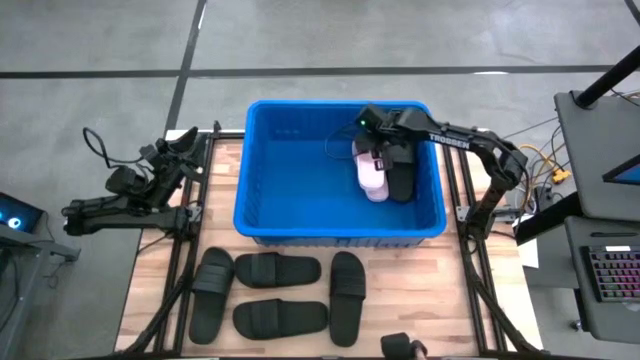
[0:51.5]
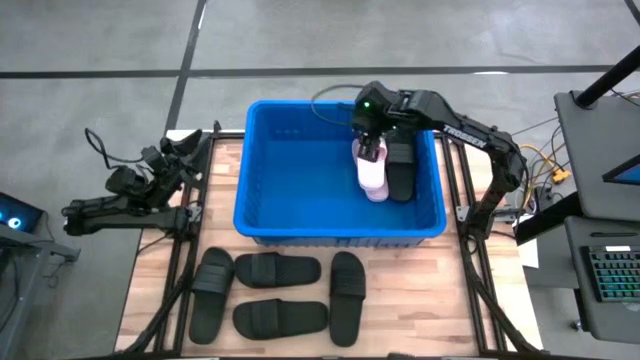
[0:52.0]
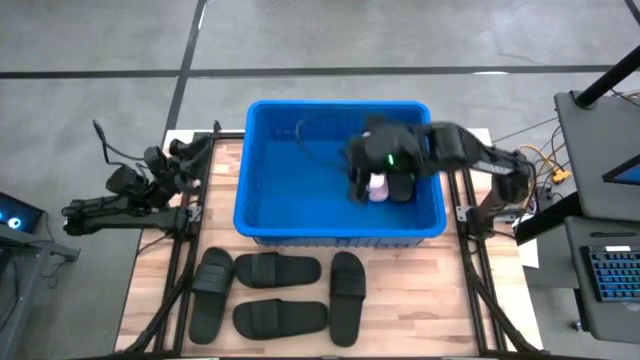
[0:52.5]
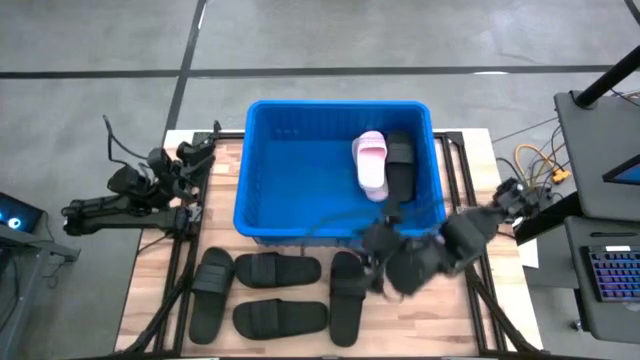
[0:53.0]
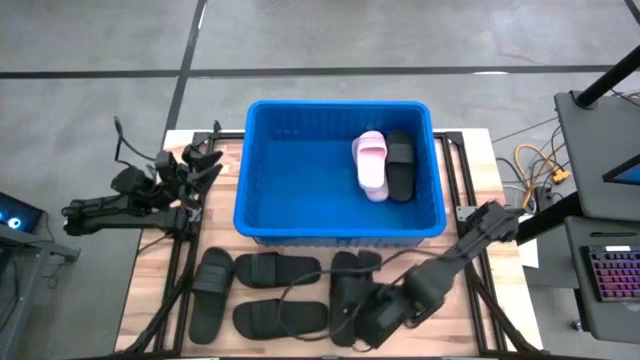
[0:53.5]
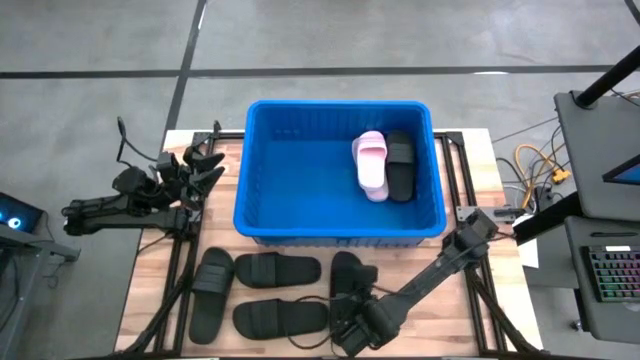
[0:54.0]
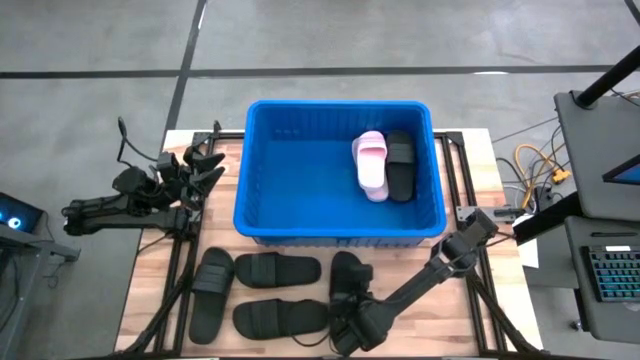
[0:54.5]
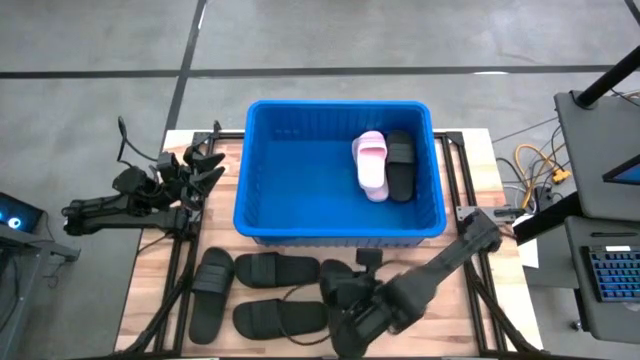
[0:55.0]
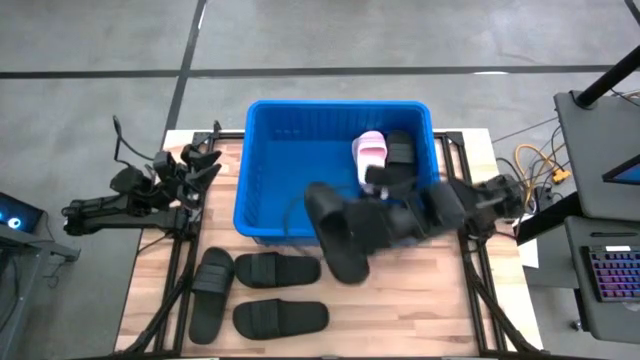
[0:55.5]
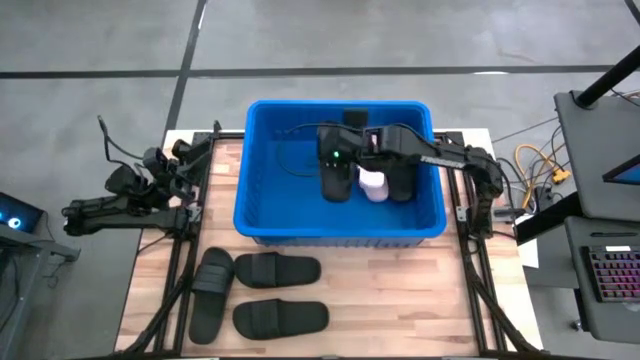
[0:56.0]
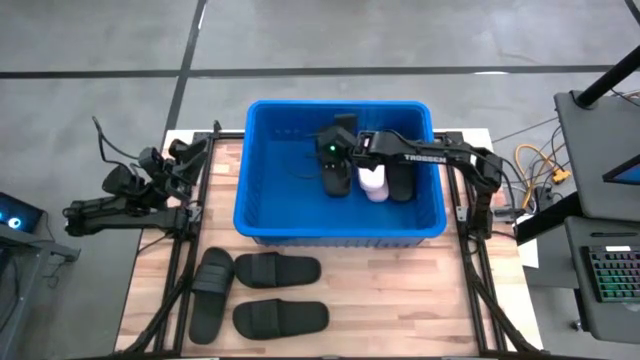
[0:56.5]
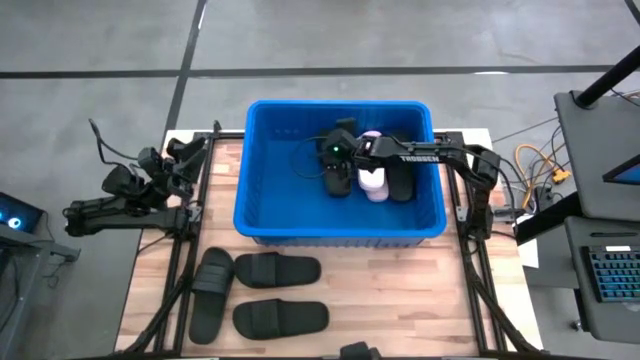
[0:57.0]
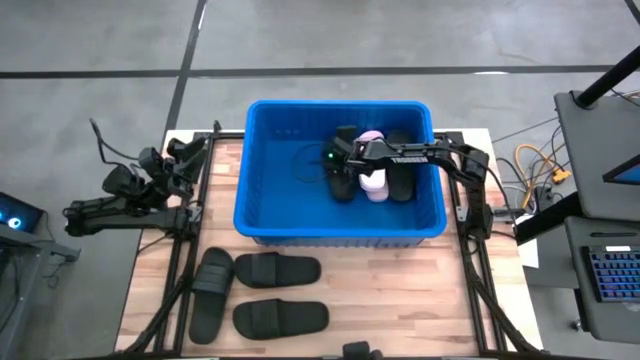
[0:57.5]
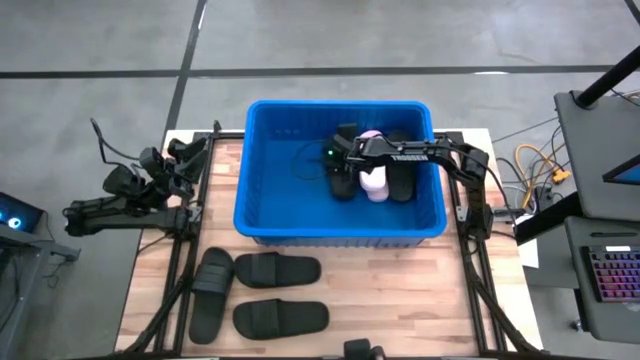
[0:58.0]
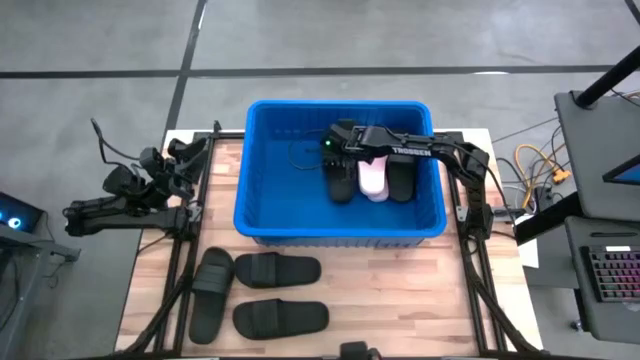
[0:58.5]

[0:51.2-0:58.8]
Task: Pick and place slides into bin
Put the black slide into the blue bin

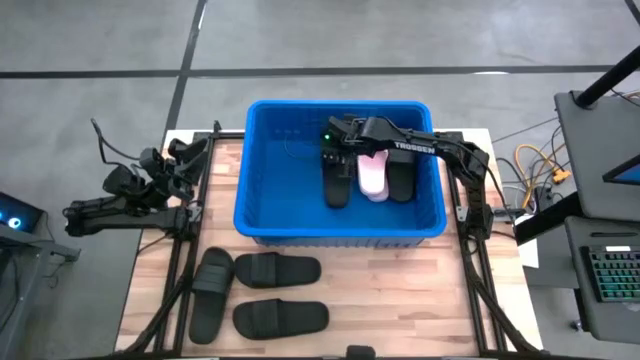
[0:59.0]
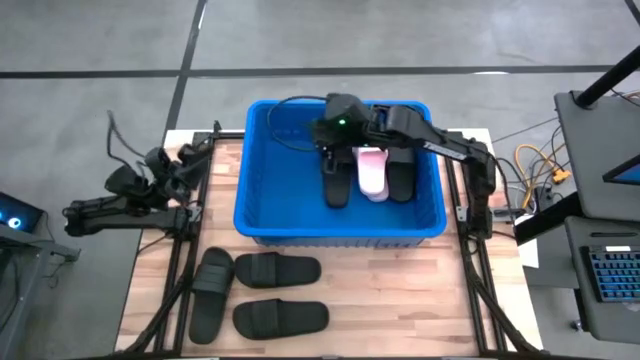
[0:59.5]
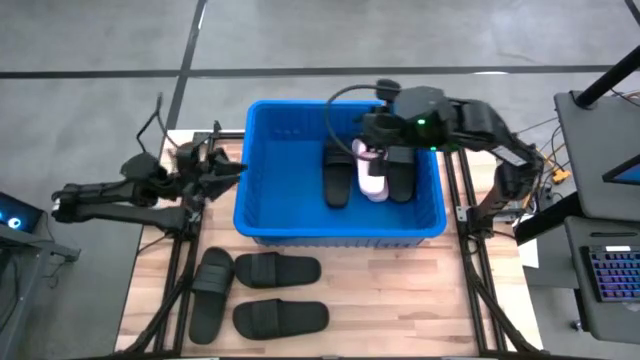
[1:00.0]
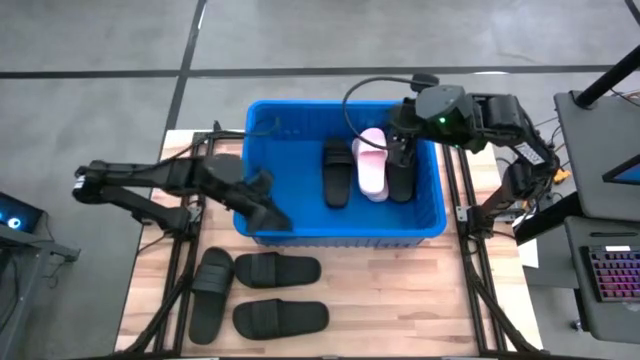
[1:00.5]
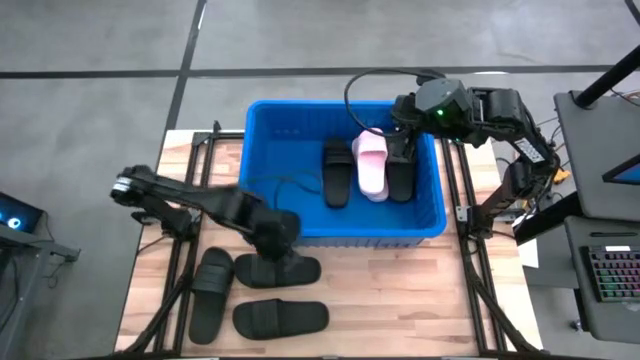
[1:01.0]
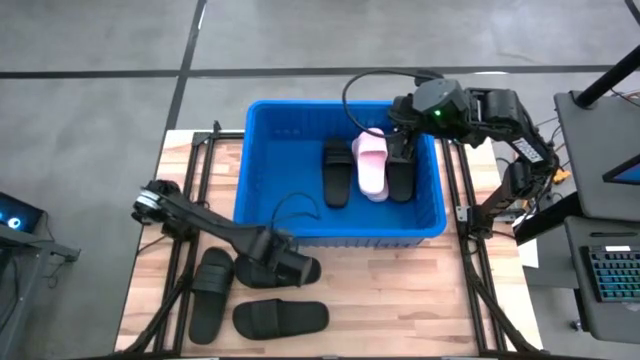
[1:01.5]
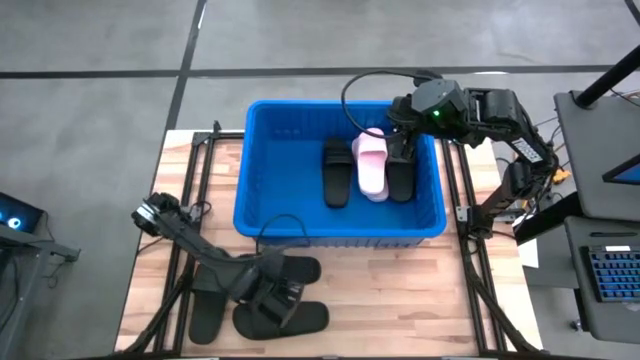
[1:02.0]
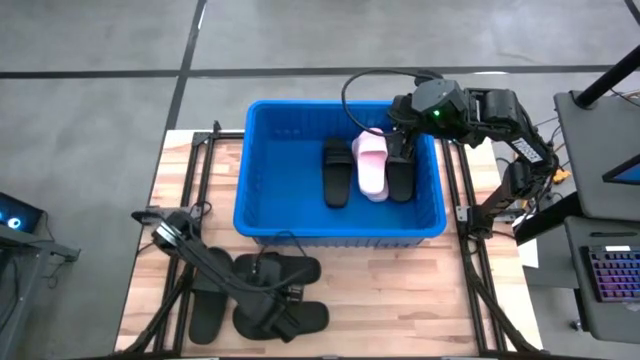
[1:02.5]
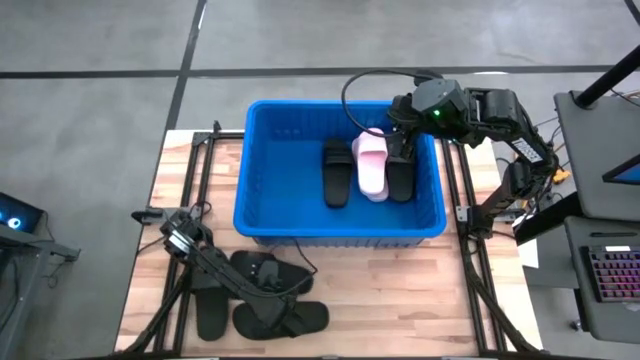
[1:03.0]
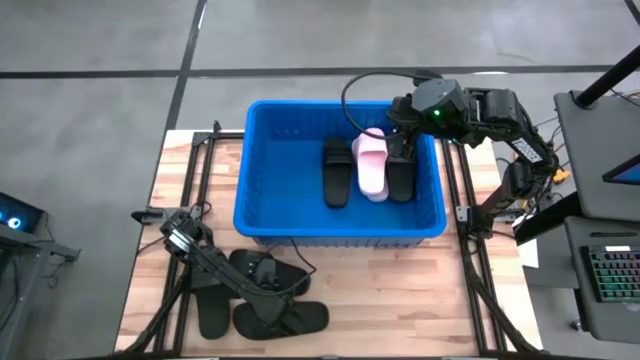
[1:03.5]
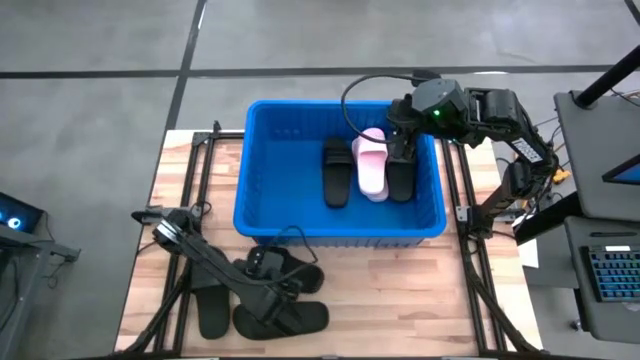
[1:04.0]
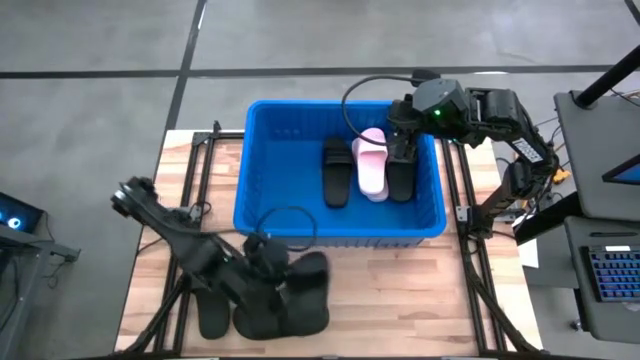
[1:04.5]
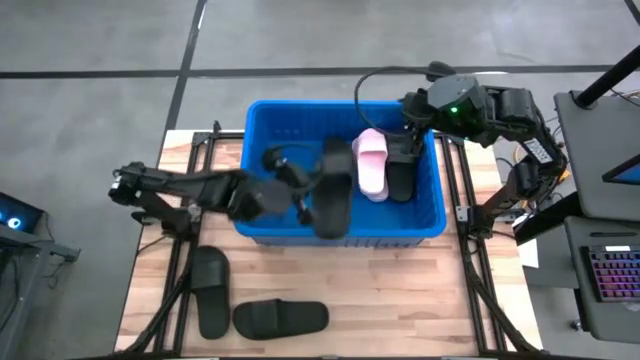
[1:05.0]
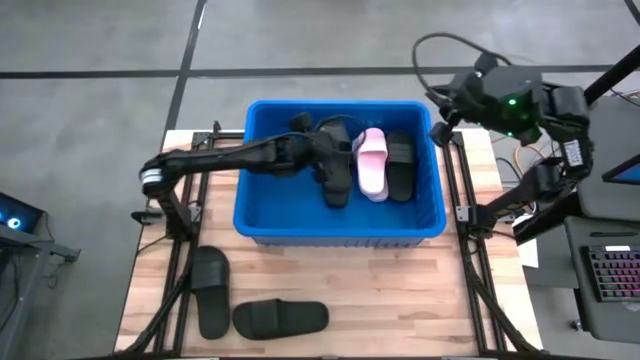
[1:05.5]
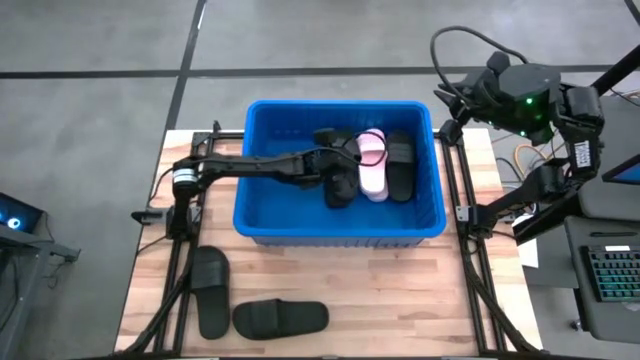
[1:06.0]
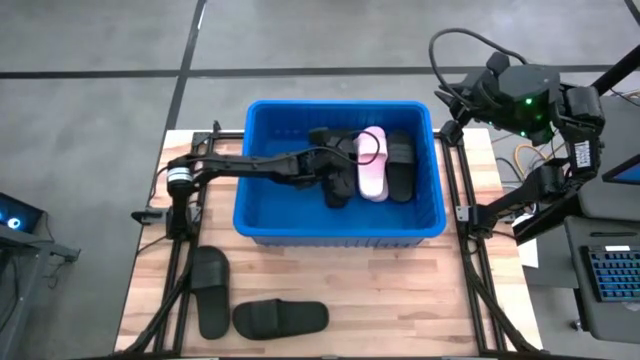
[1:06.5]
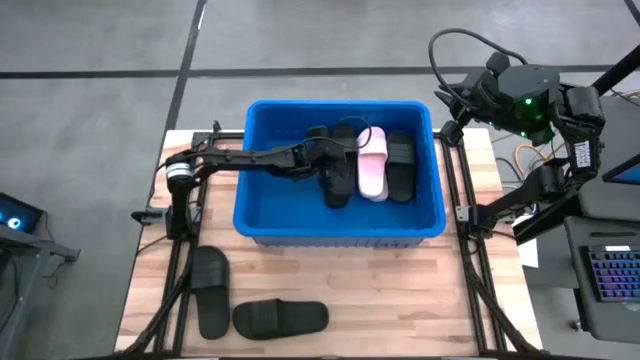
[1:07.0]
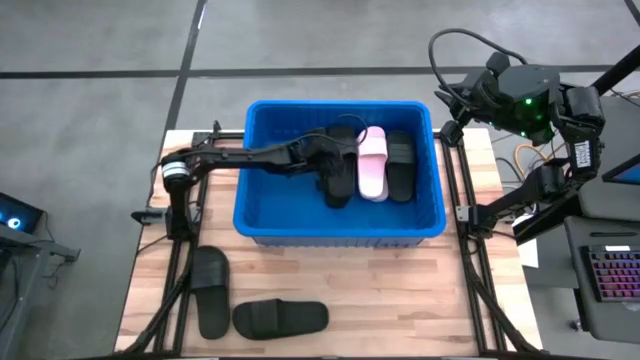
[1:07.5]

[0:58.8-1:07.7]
Put the black slide into the blue bin

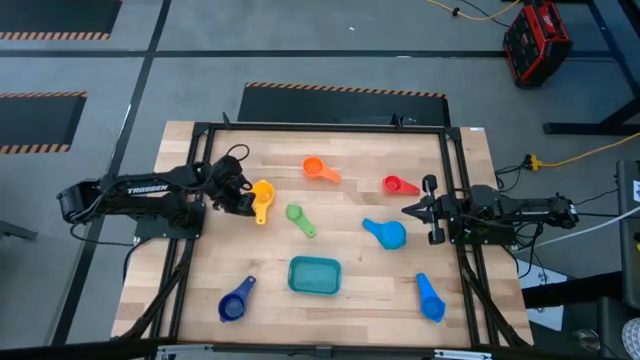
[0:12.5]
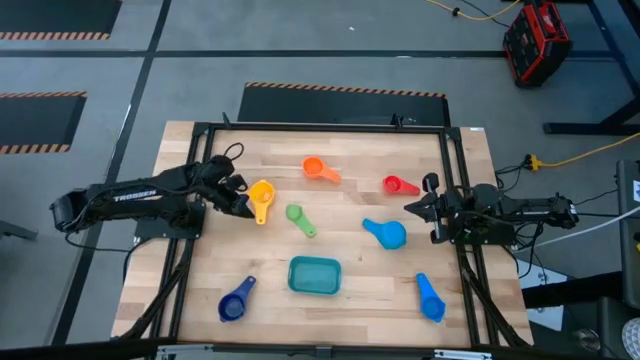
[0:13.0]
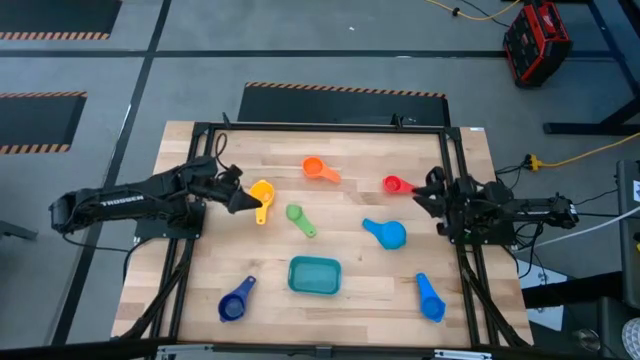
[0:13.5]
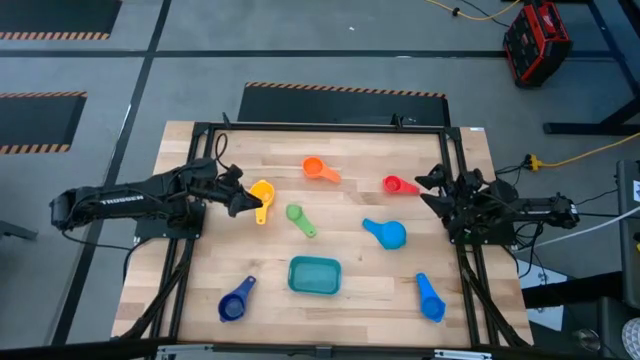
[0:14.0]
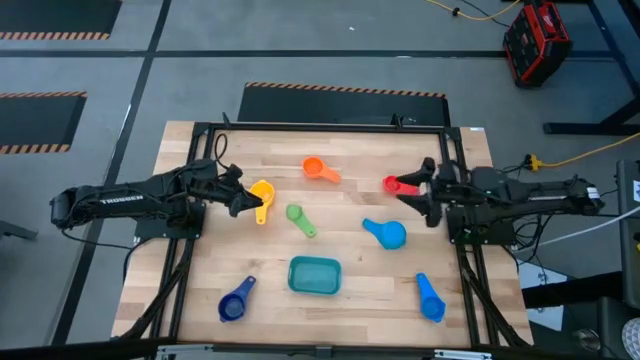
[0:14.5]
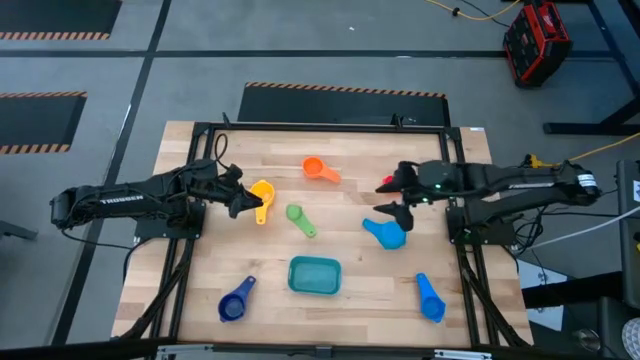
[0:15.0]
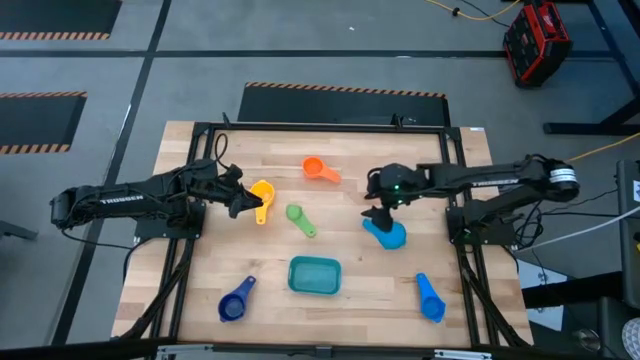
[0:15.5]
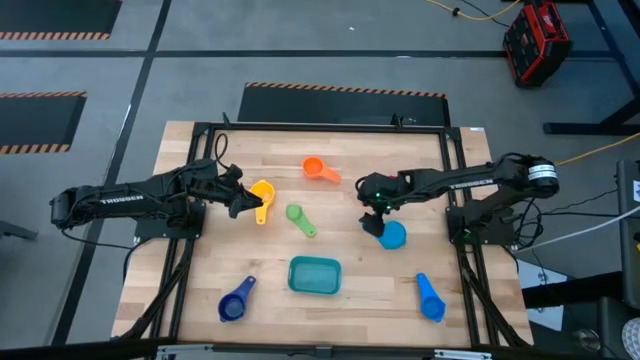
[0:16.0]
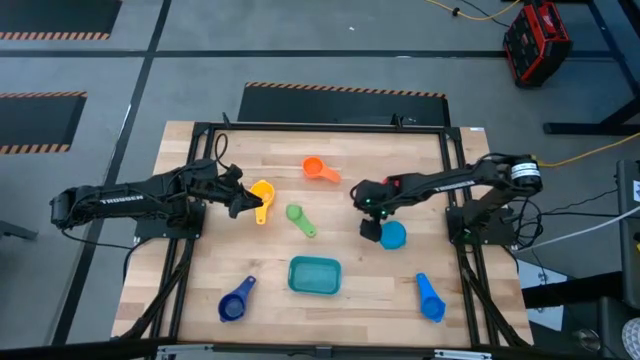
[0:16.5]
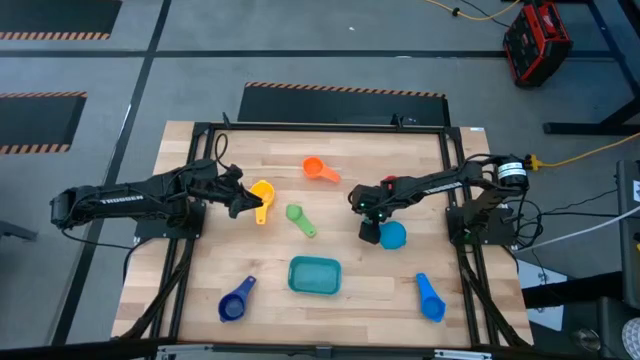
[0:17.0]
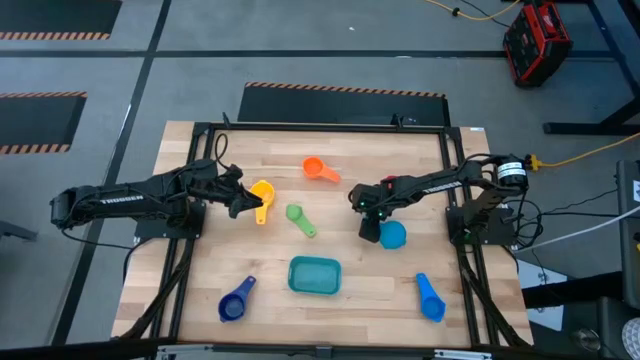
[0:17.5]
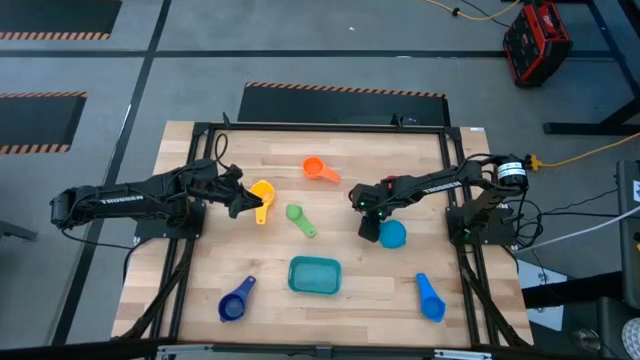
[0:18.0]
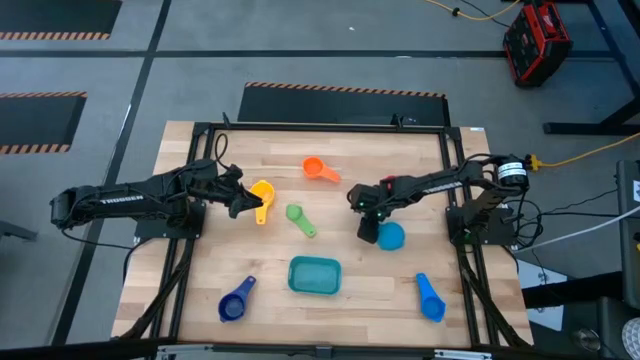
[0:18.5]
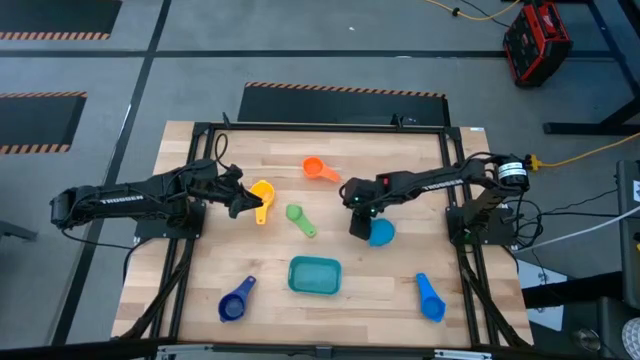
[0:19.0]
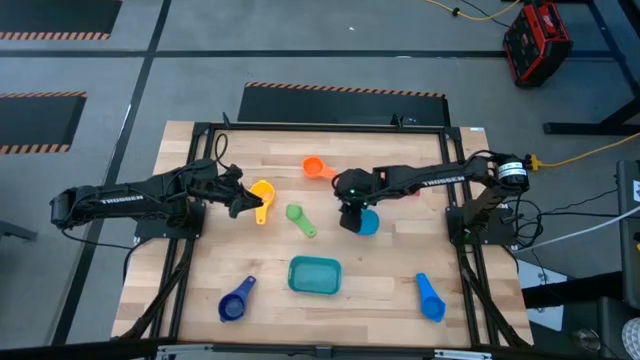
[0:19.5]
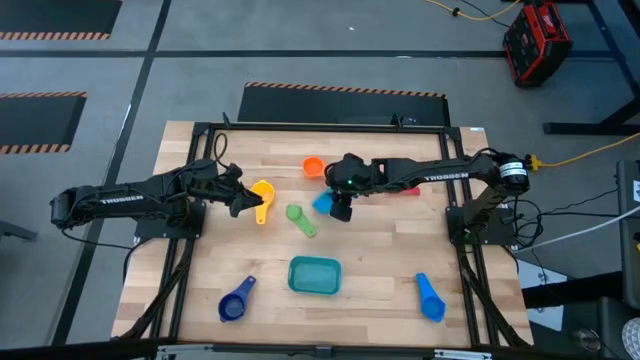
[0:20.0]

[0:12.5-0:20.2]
Task: Nest measuring cups in basket
Adjust the light blue measuring cup
